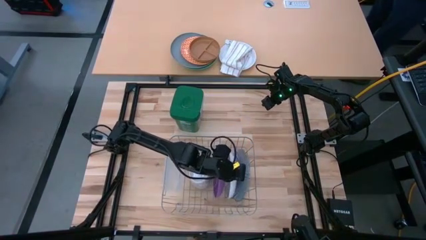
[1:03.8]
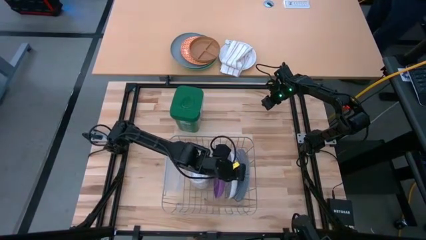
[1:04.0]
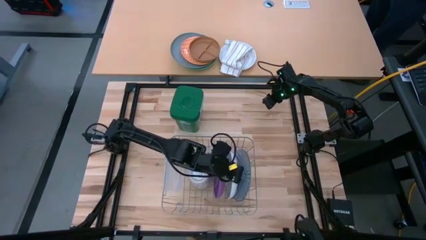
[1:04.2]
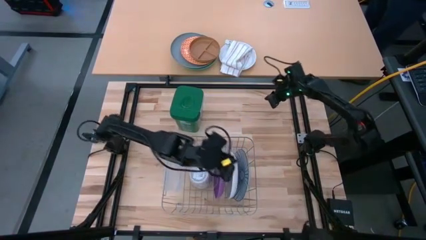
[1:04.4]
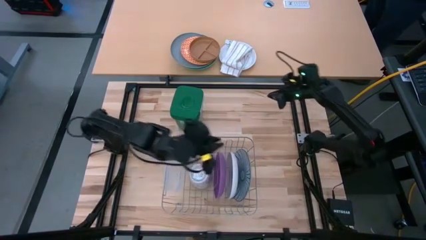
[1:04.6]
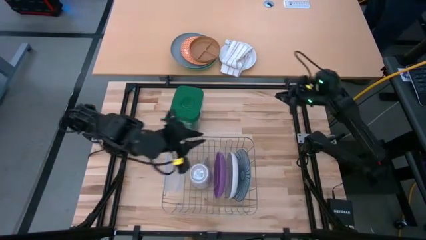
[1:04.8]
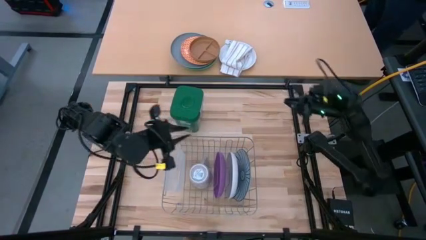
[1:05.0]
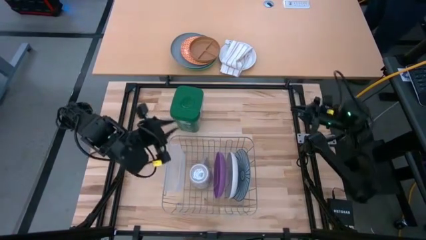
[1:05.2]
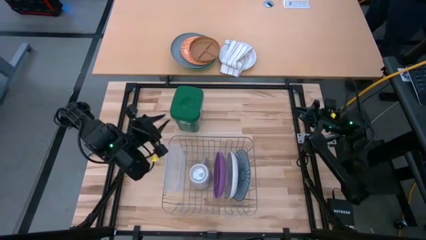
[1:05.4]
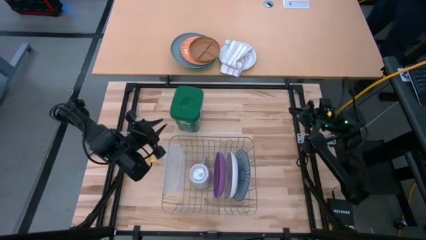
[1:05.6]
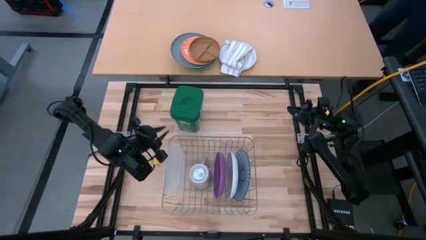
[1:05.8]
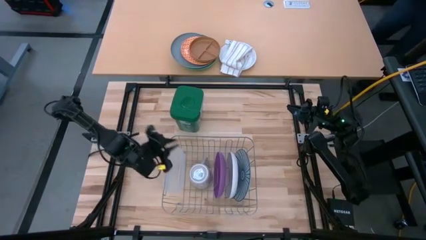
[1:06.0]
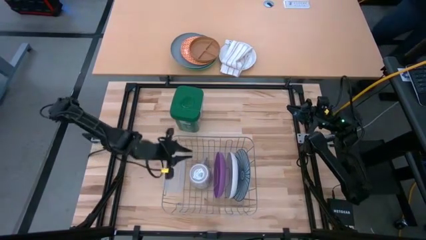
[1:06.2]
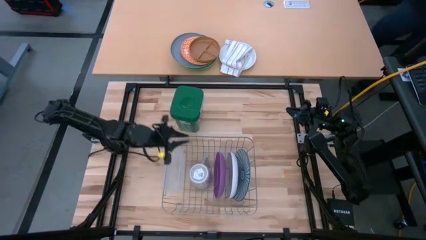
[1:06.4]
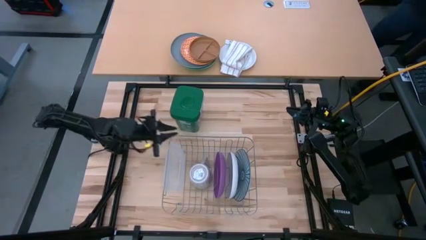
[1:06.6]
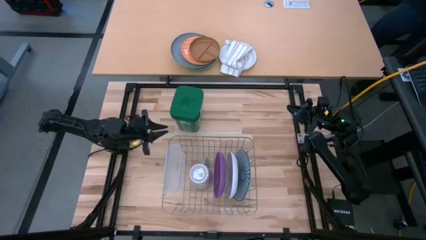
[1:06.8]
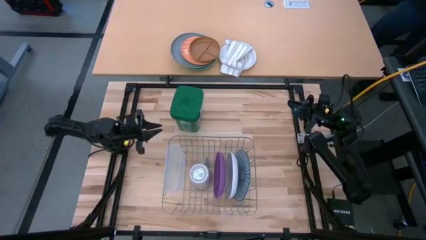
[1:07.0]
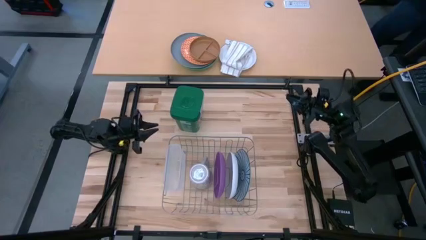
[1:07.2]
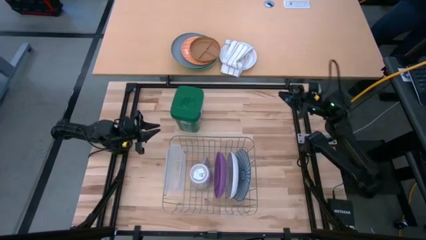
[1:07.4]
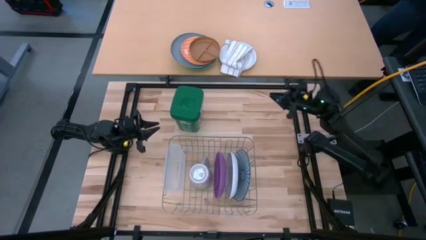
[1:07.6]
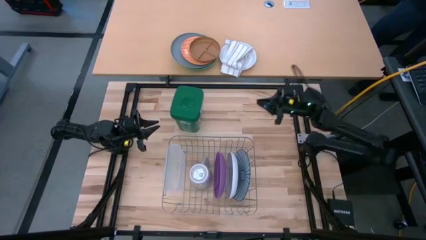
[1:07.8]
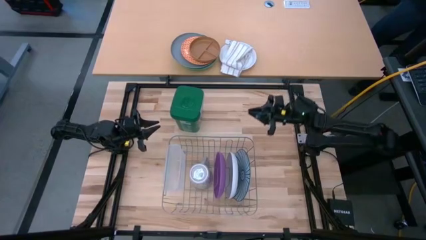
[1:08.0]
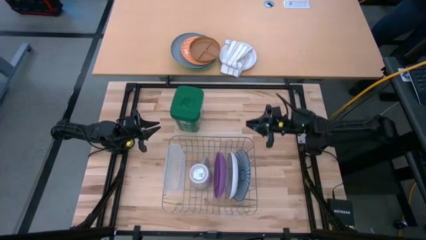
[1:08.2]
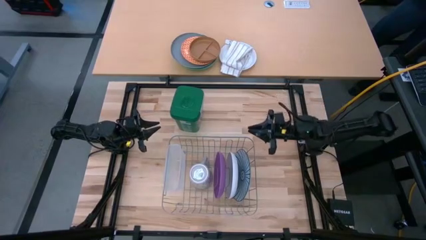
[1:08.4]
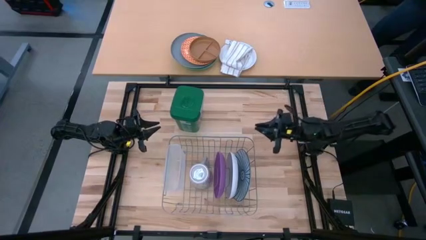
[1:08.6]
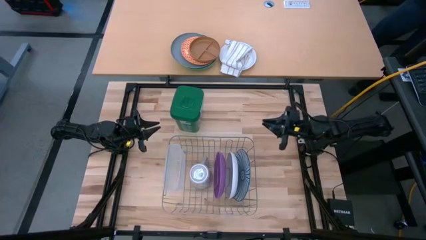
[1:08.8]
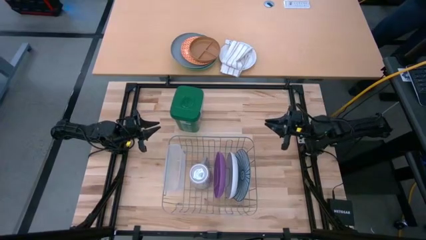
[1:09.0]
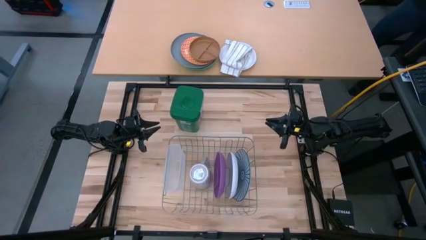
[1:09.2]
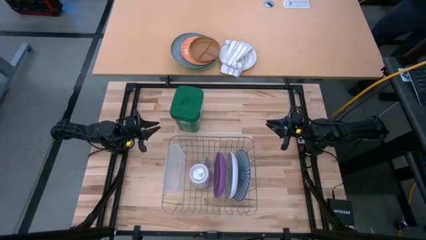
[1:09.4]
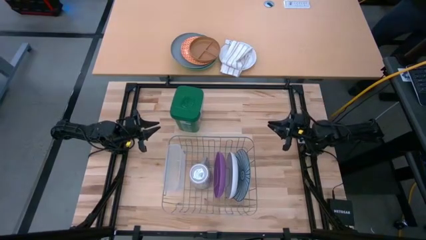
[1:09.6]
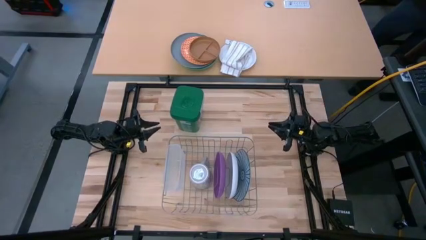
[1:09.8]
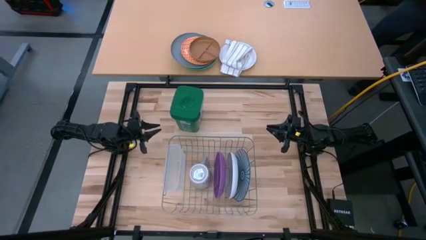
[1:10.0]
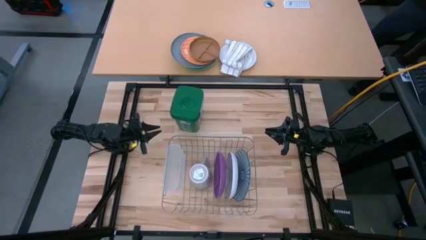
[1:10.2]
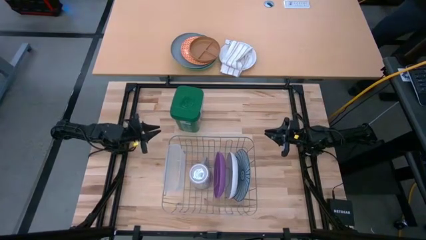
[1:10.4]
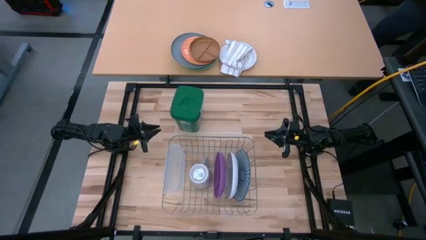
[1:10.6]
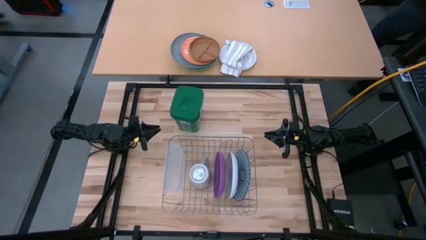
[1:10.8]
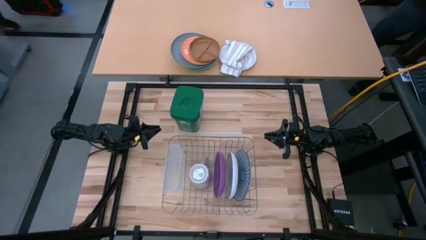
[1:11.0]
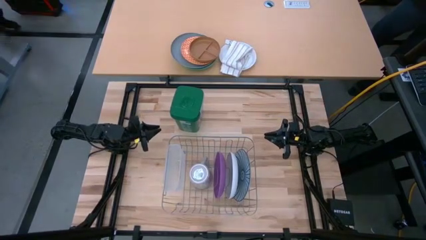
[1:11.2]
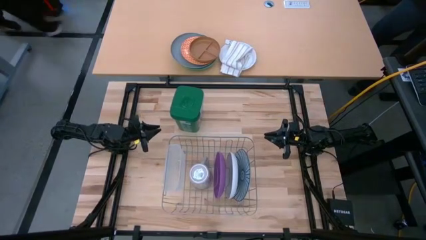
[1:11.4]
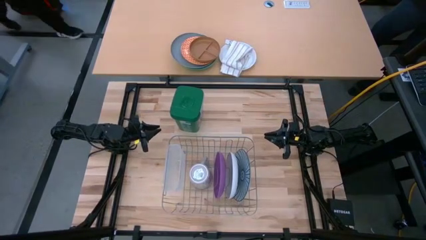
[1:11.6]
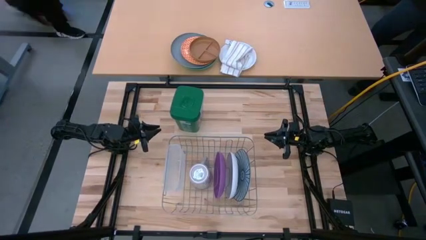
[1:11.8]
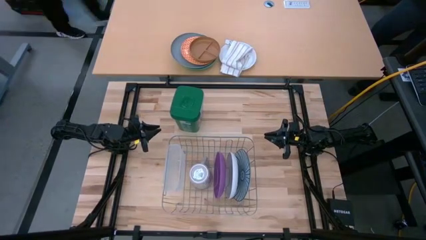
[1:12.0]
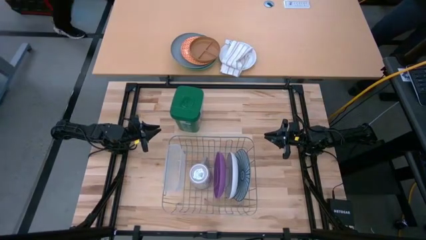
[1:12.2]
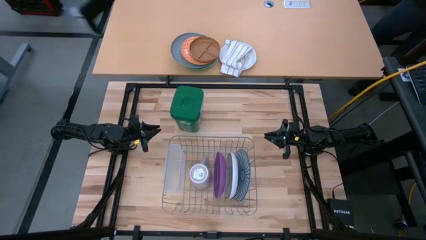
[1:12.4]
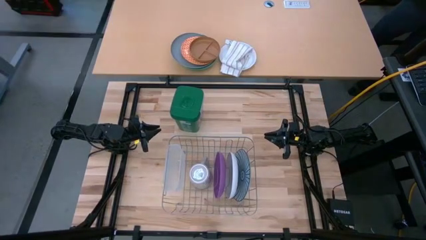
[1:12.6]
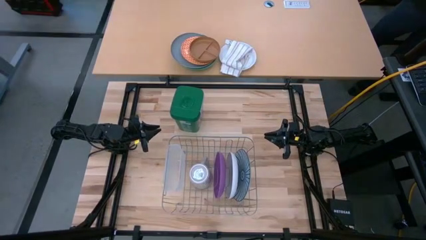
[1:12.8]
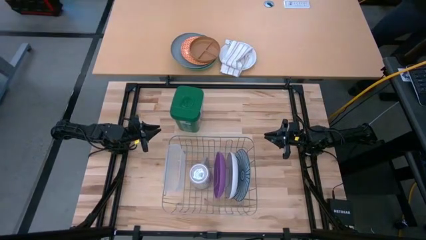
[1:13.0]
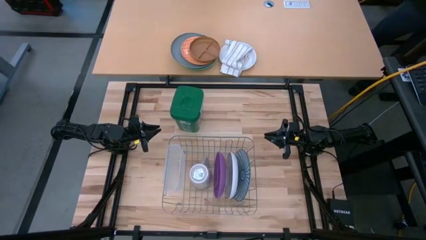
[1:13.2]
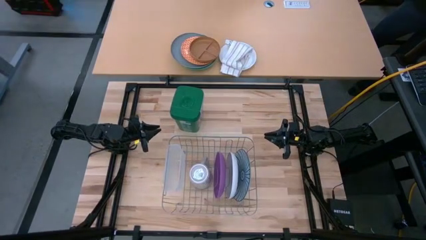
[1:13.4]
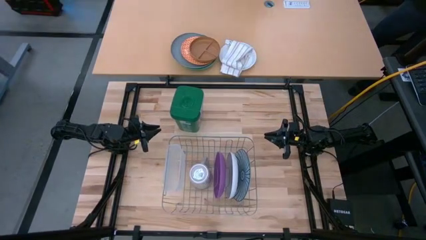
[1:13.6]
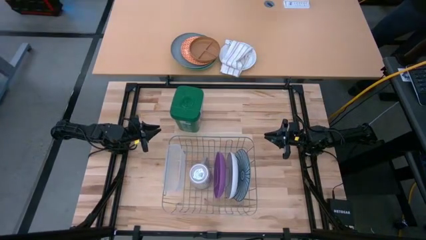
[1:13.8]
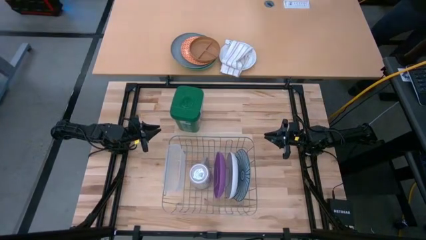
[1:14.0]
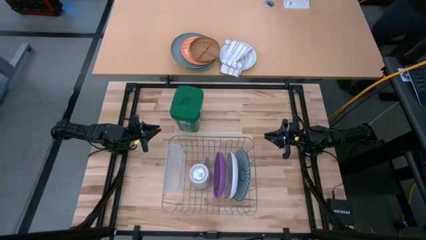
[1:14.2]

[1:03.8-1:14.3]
Task: Sort dishes
Return to Home Position

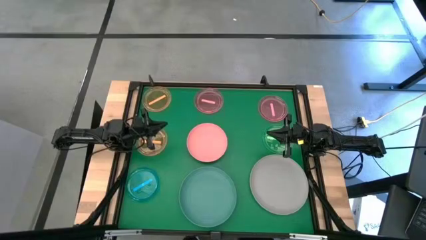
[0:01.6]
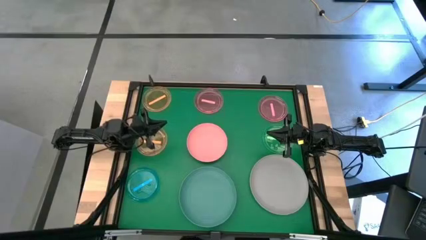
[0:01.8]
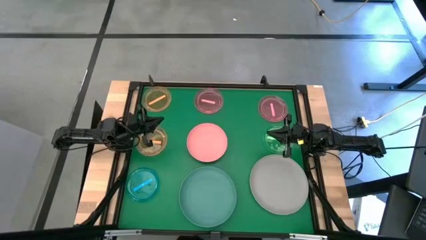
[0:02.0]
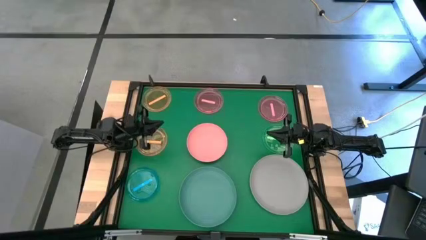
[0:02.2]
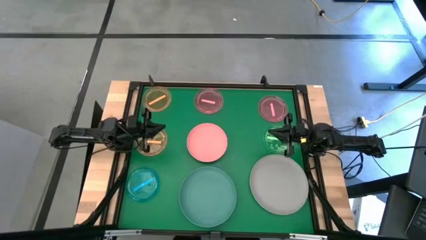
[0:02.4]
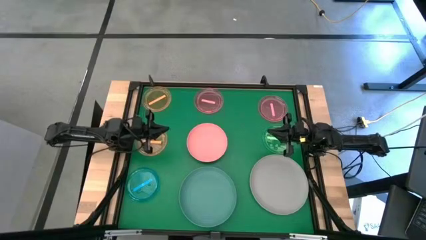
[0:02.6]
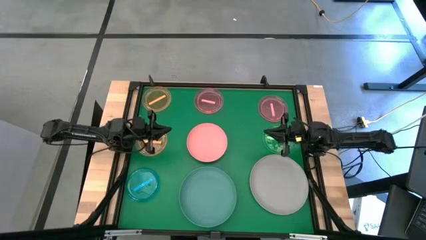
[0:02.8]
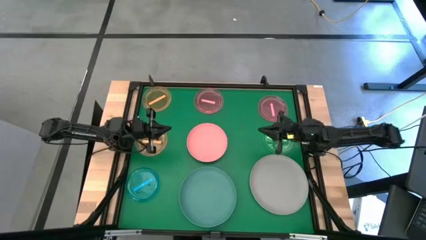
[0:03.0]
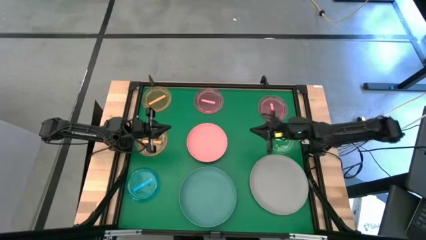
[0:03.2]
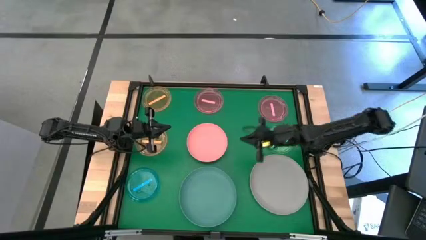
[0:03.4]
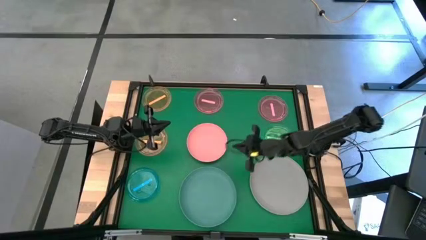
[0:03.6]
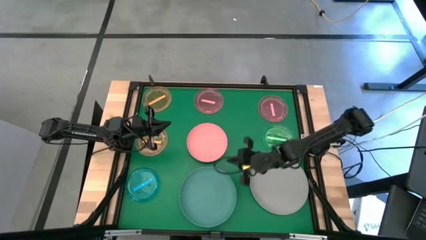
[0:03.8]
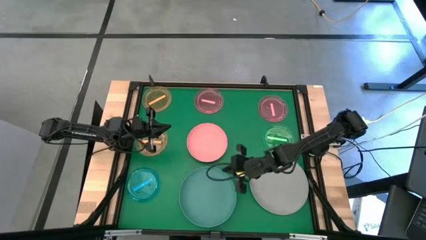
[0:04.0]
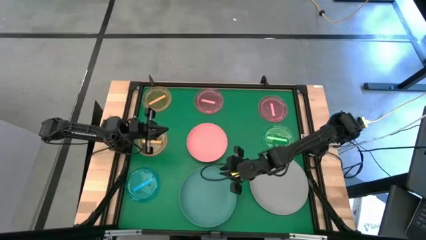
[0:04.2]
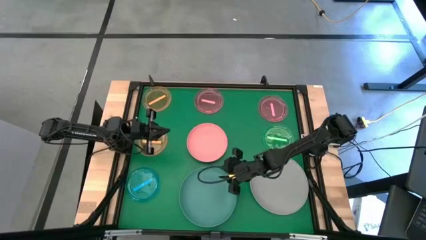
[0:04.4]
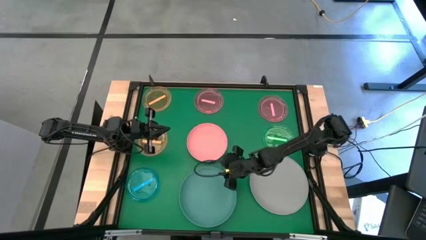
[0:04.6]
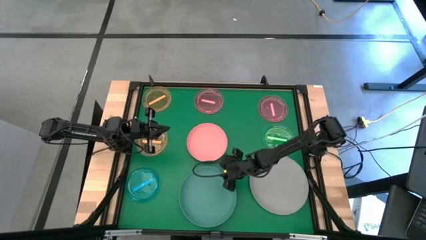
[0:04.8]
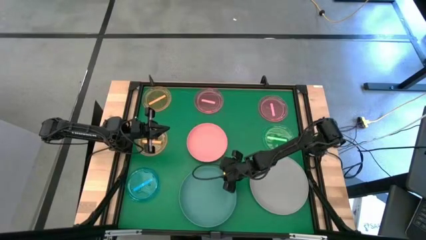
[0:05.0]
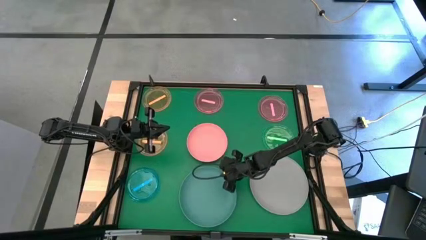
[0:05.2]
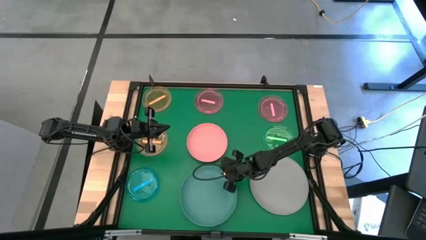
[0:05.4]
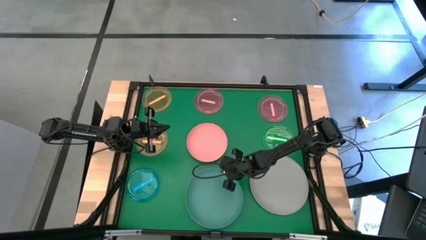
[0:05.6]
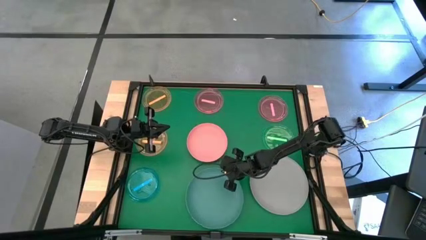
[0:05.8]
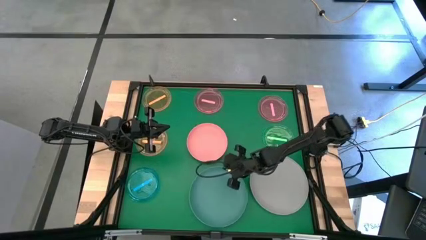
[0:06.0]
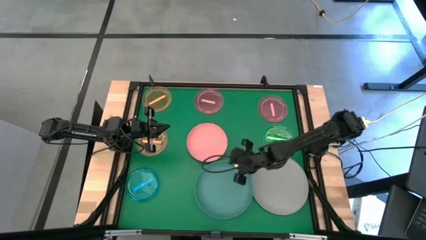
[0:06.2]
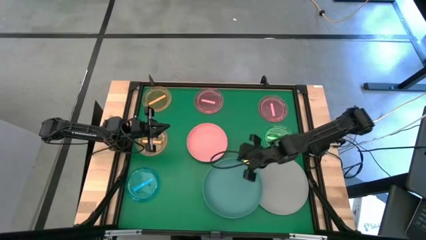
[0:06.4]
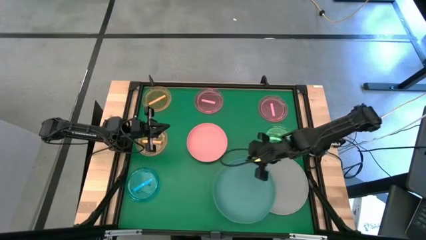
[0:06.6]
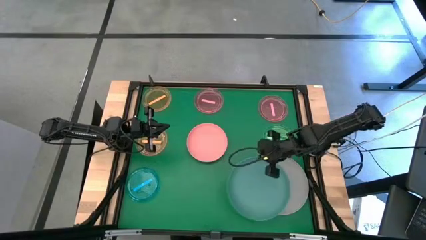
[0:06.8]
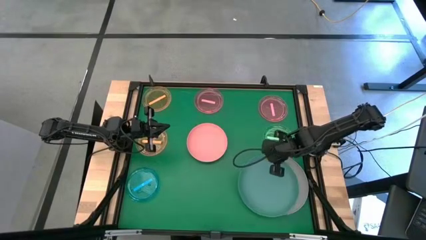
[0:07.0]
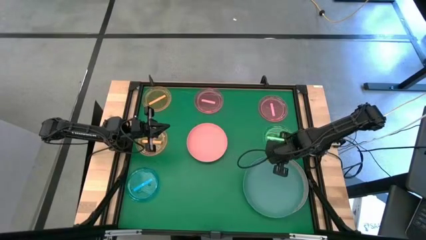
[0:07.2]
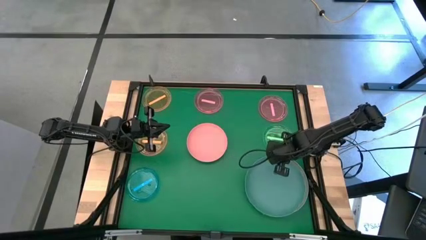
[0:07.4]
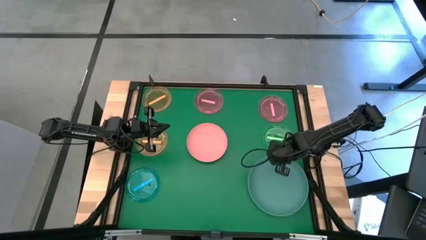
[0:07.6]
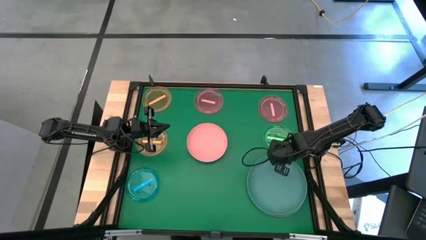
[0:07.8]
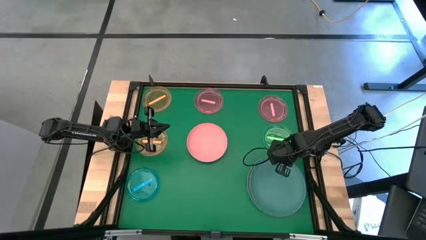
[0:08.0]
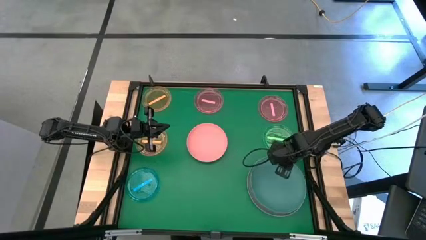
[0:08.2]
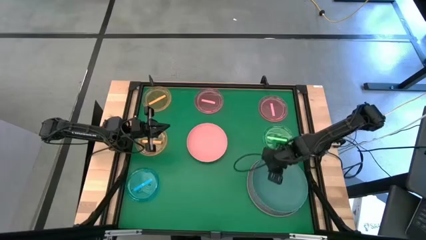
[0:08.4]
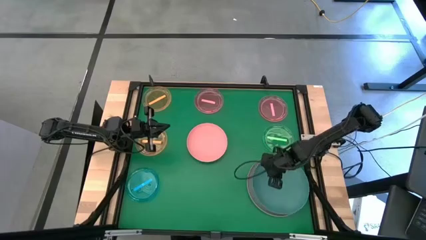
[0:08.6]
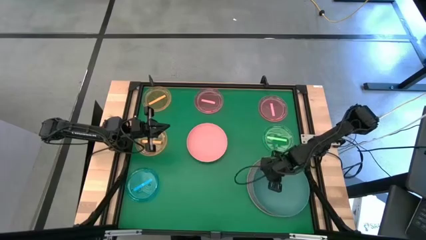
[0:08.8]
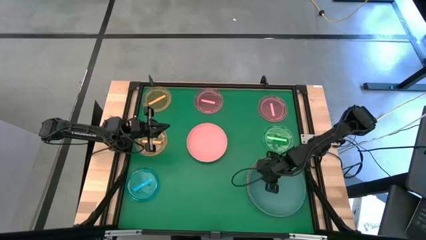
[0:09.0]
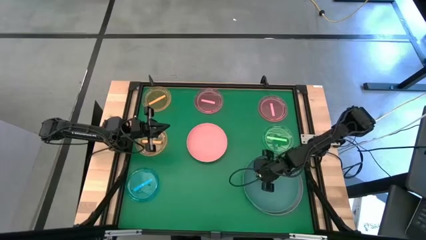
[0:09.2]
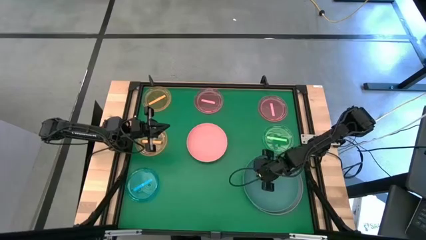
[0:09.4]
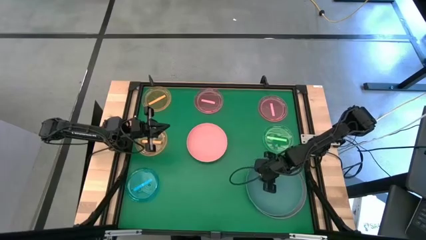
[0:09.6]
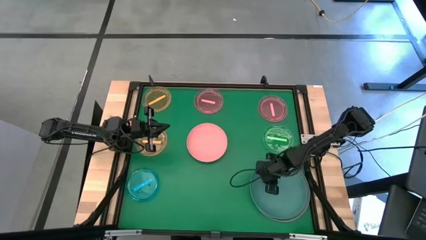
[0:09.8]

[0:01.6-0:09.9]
Task: Stack plastic plates
Stack the blue plate on top of the gray plate
